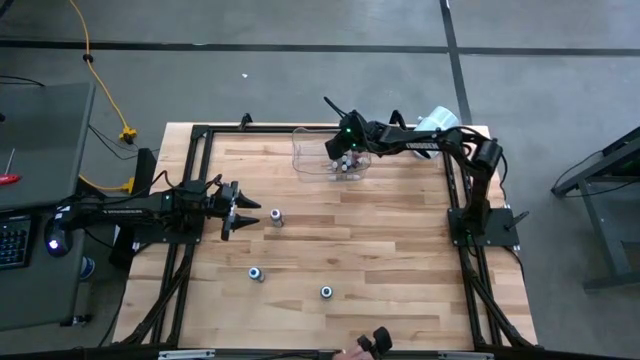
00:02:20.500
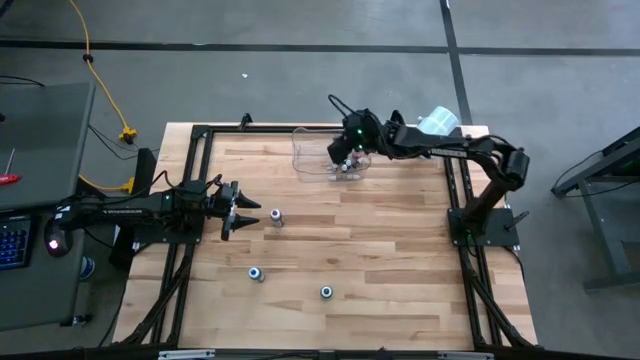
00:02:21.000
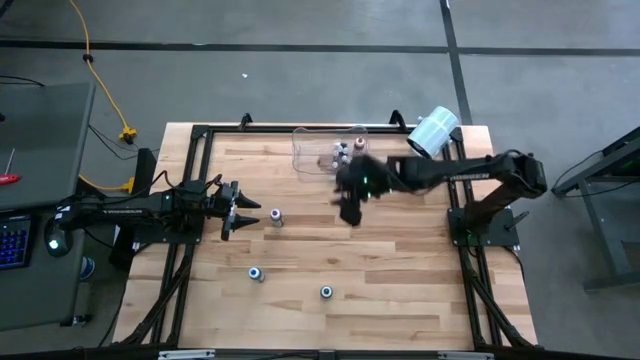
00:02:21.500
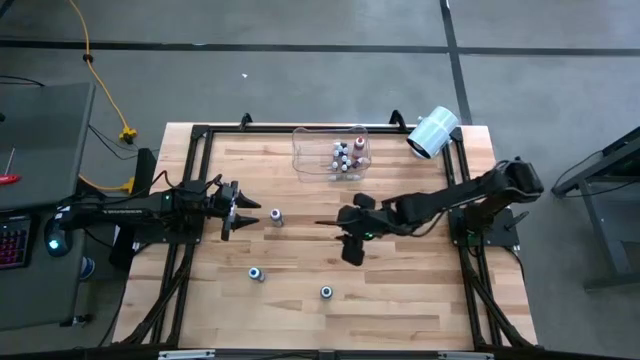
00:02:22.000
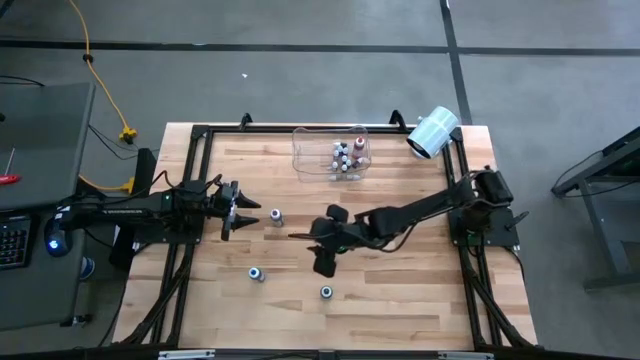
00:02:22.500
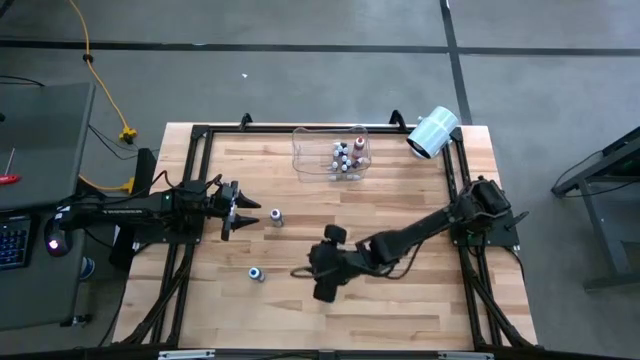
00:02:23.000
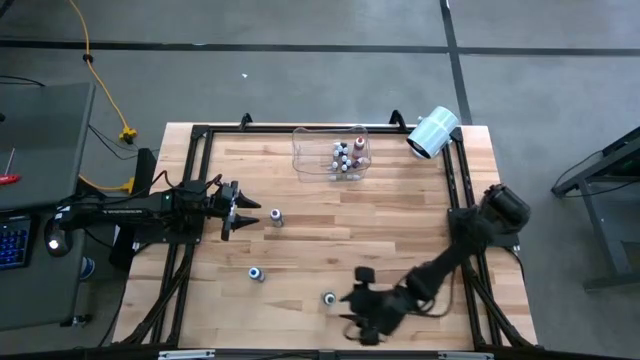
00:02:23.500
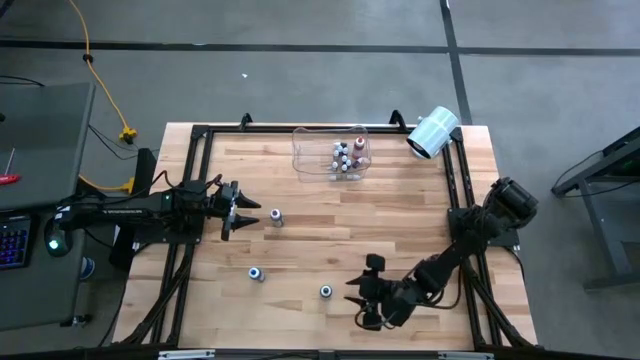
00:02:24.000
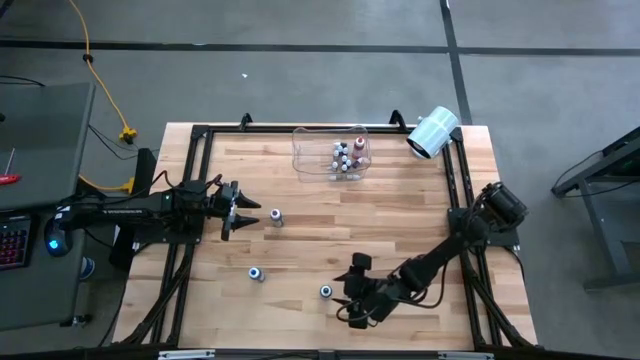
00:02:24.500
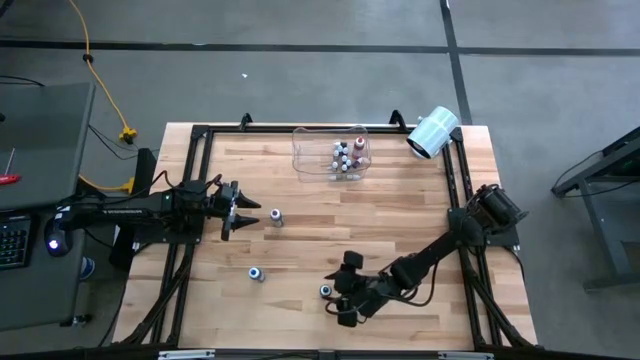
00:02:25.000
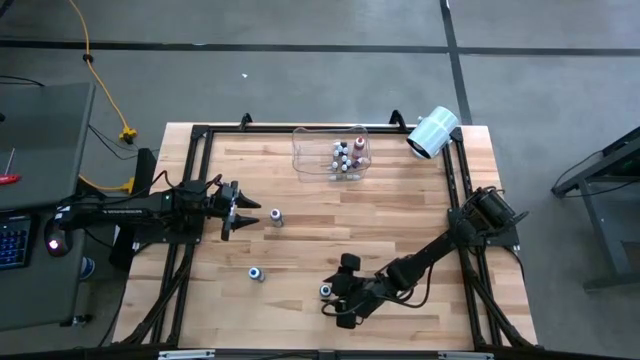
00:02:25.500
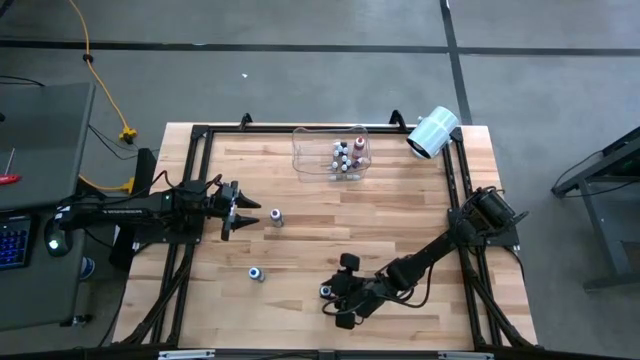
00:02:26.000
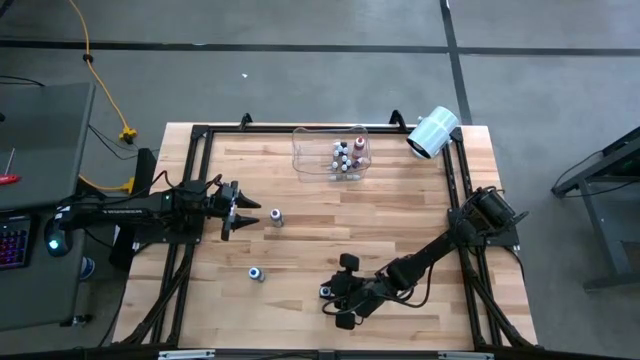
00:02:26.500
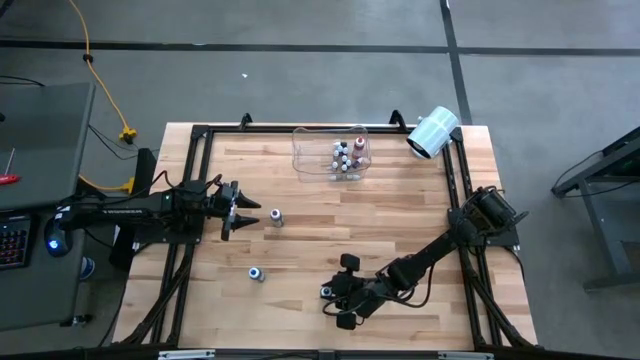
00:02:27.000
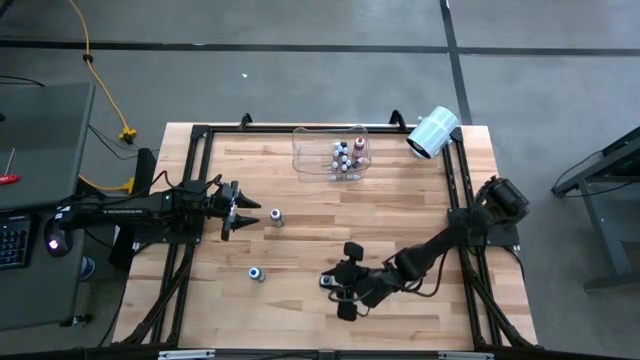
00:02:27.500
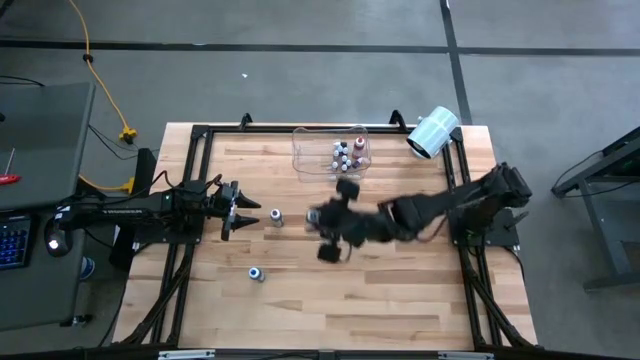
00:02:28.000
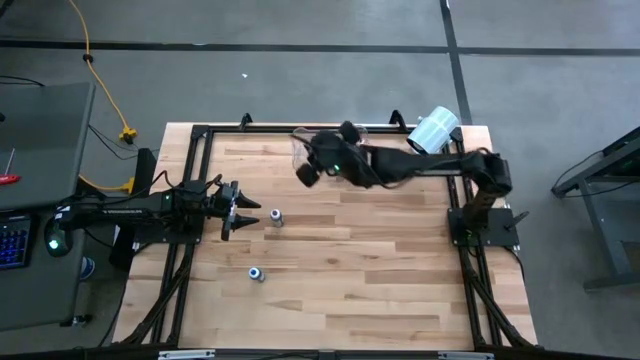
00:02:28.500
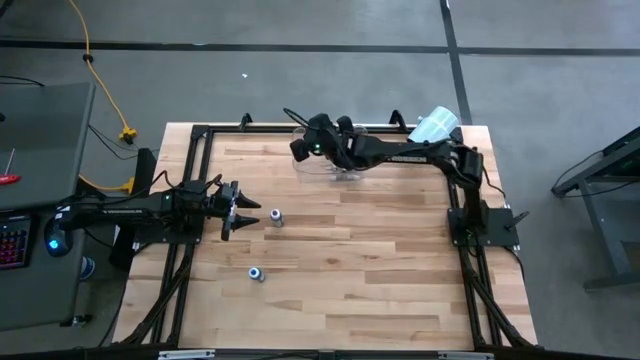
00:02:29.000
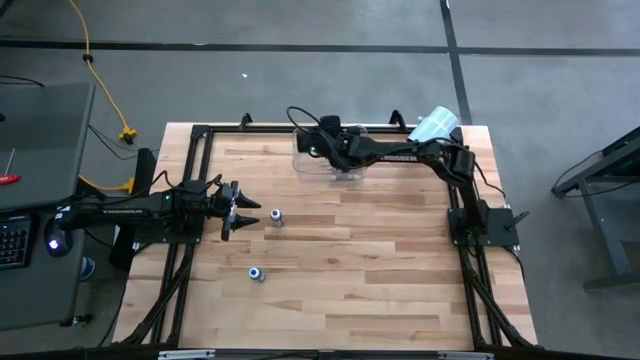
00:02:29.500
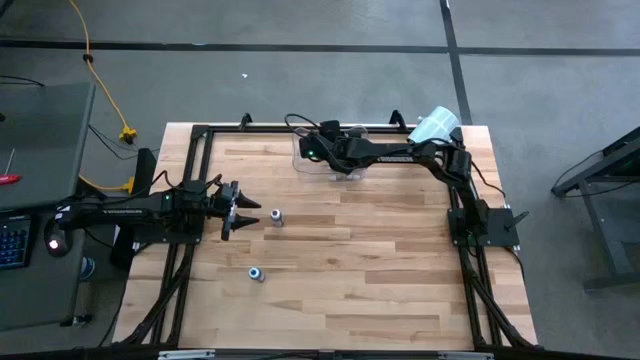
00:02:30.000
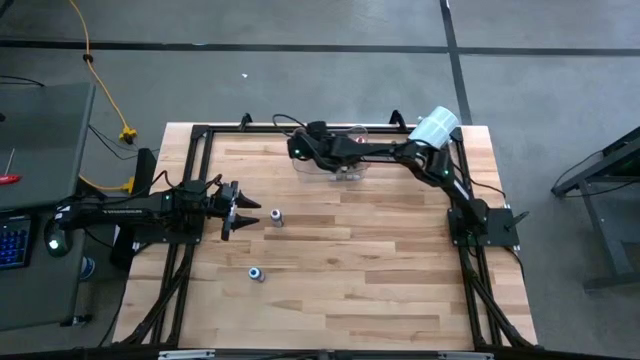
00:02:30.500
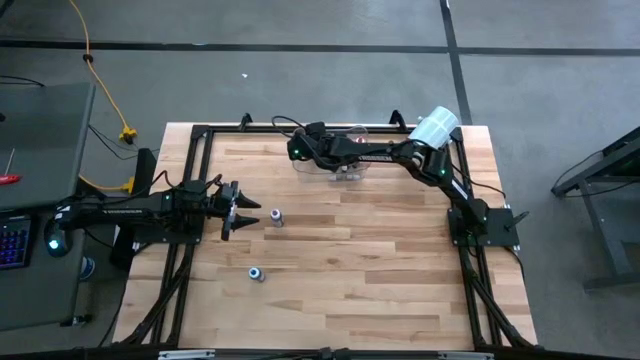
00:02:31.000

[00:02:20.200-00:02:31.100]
Task: Pick & Place food coloring
Put the large black food coloring into the transparent container

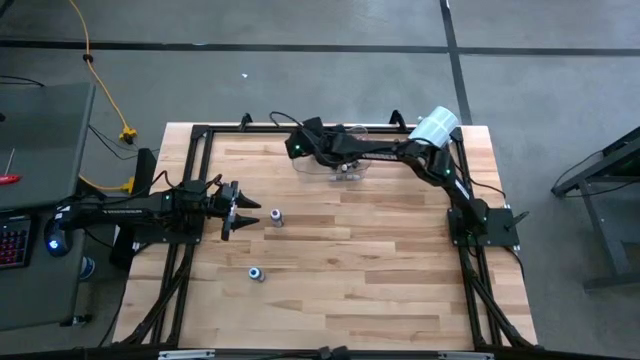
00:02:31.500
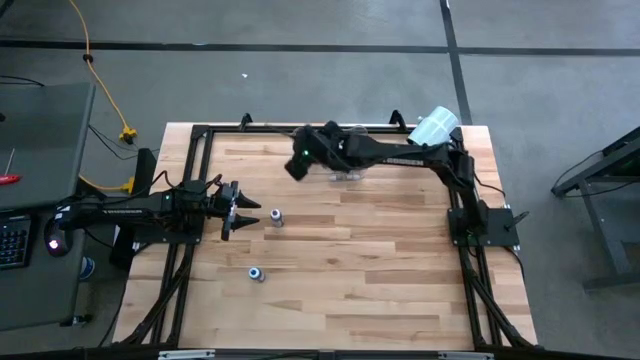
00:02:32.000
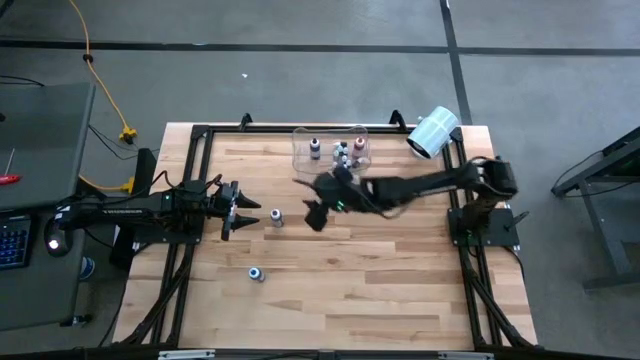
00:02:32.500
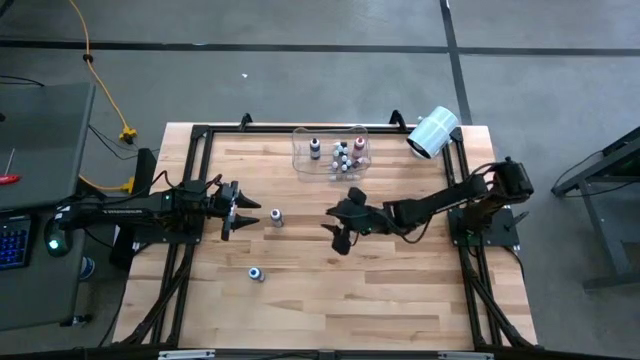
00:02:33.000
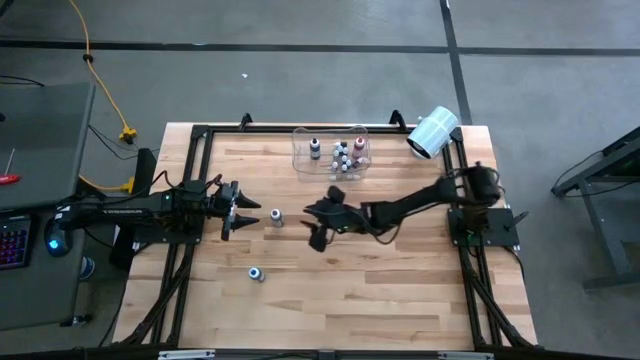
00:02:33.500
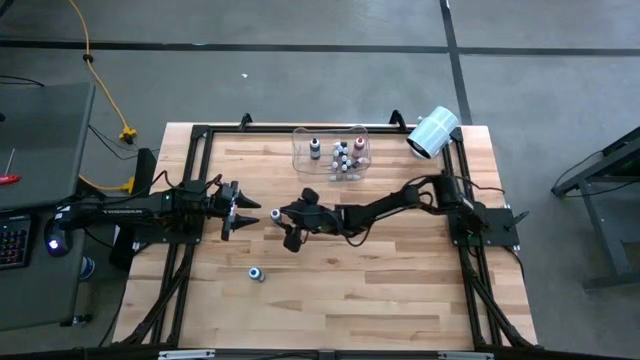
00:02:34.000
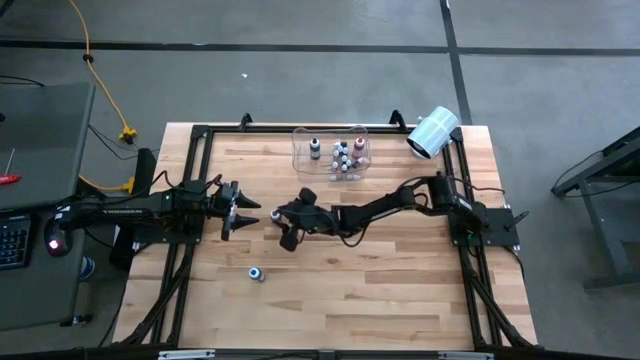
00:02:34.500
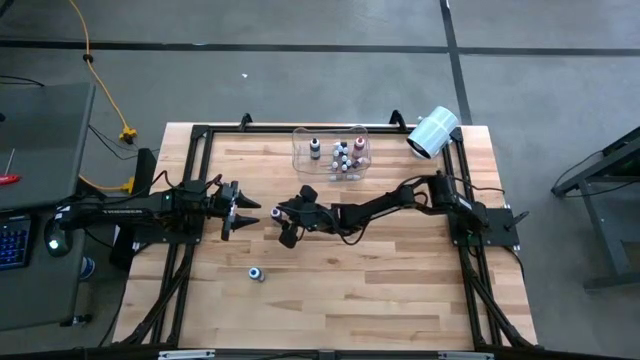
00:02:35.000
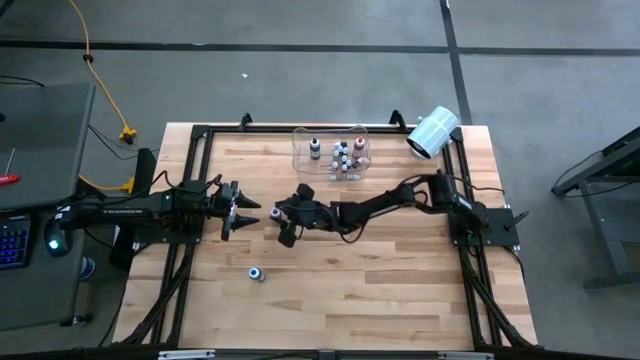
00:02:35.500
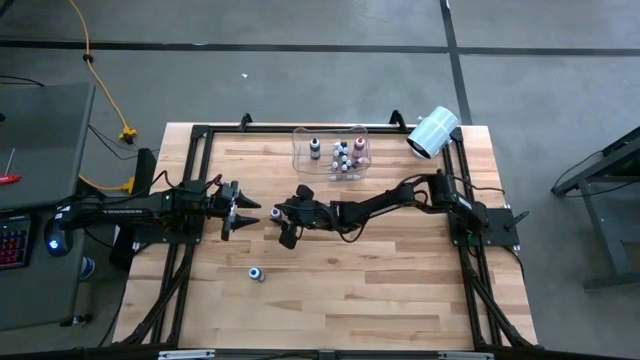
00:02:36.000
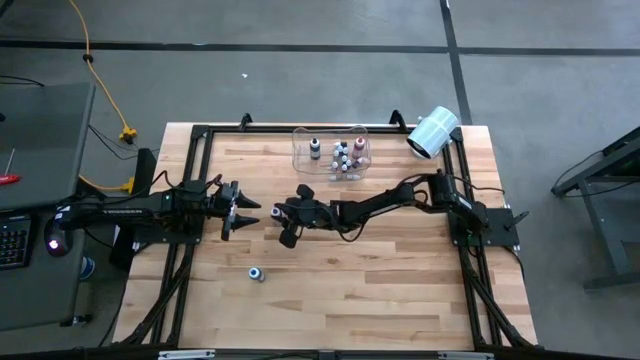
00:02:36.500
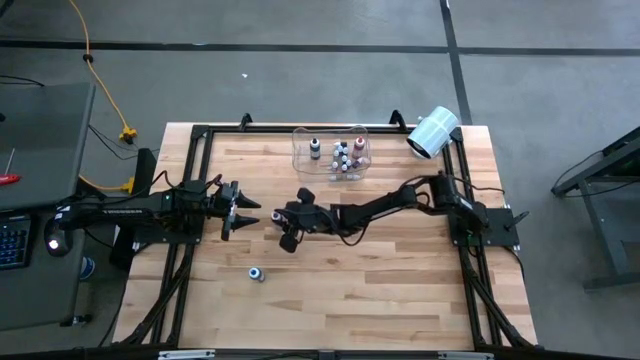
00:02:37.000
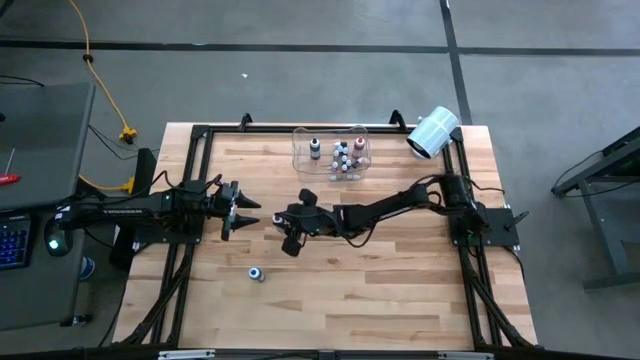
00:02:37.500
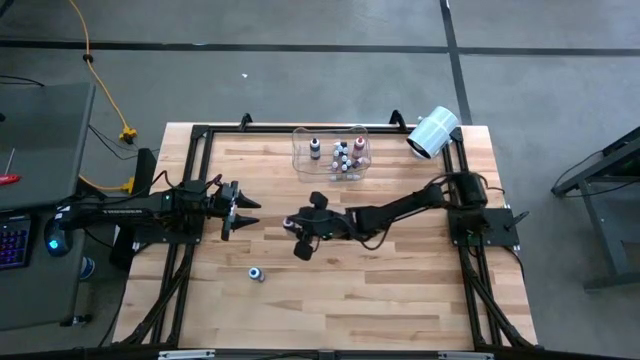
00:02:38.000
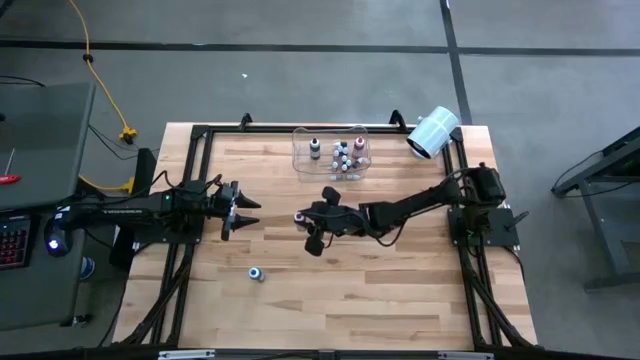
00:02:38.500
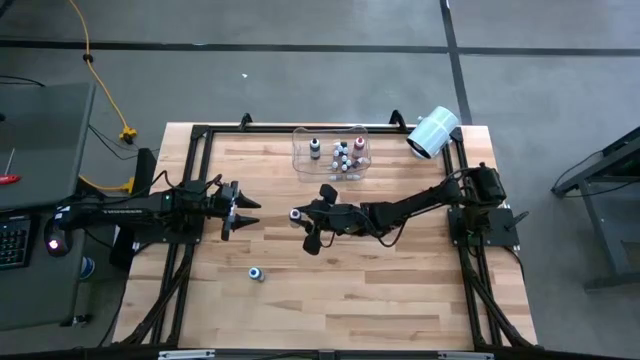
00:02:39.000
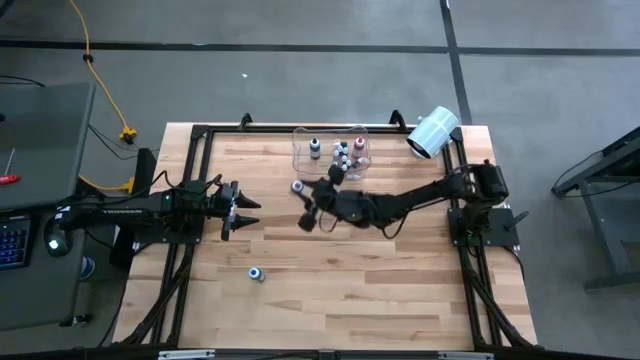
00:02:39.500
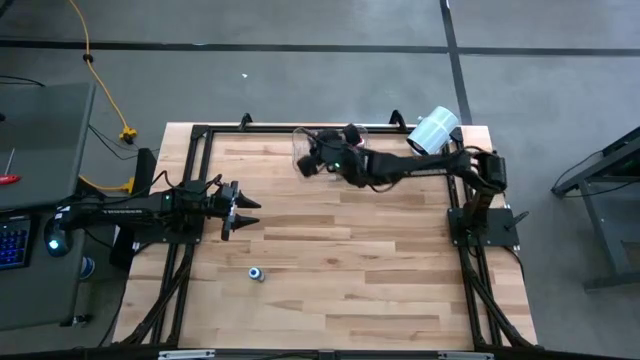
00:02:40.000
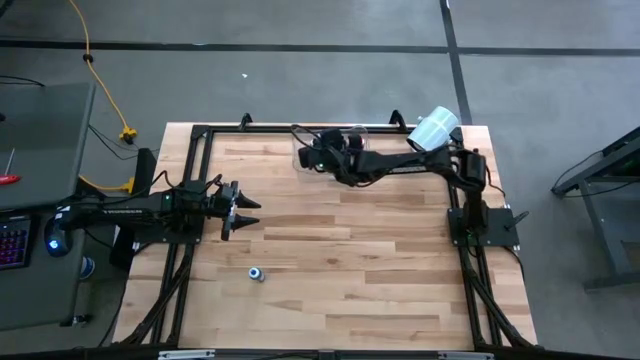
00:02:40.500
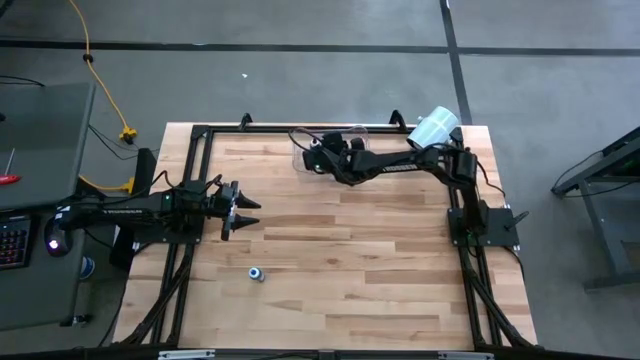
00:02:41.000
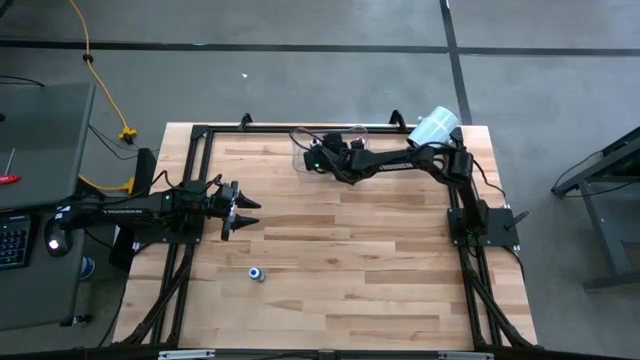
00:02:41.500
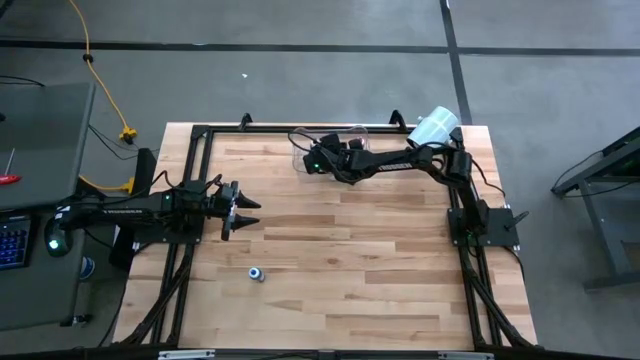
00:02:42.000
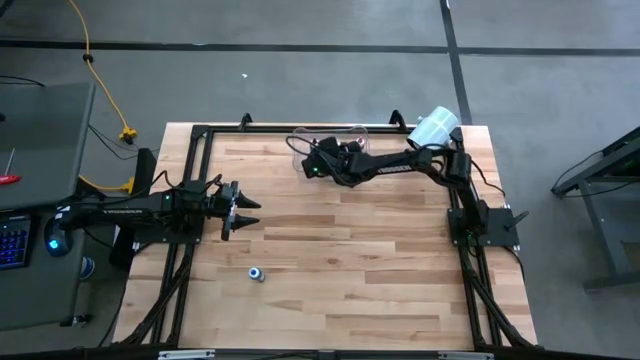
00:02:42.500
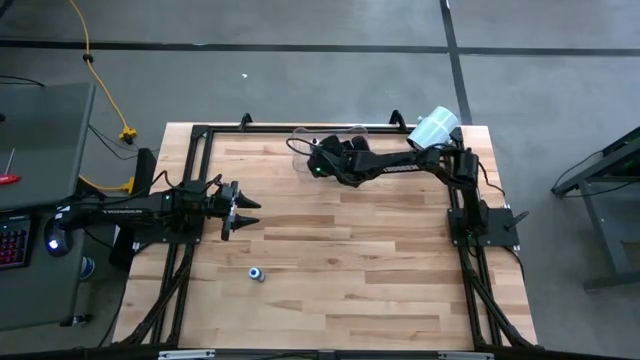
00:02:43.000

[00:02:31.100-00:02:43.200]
Put the large purple food coloring into the transparent container
